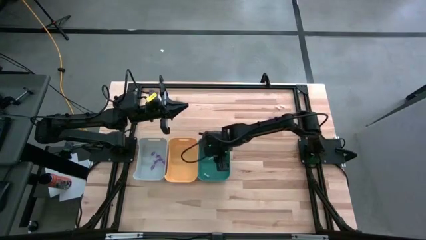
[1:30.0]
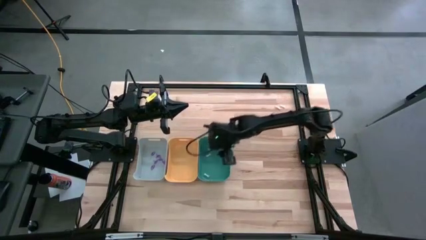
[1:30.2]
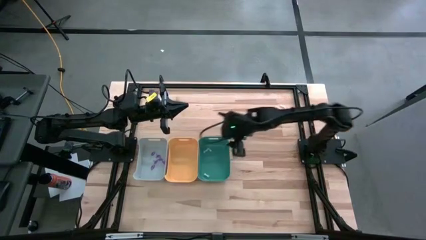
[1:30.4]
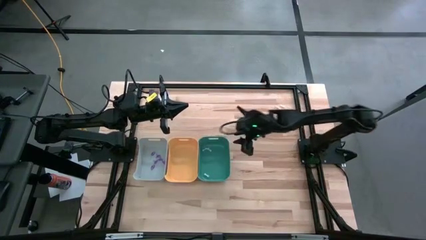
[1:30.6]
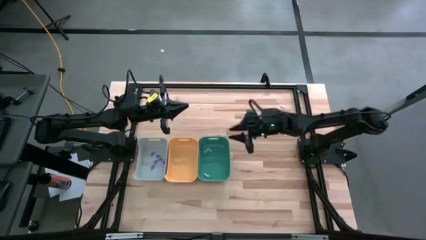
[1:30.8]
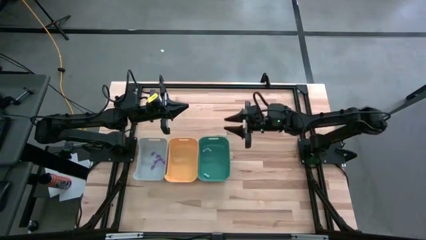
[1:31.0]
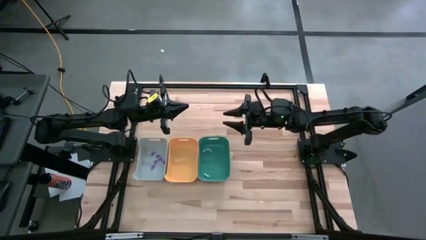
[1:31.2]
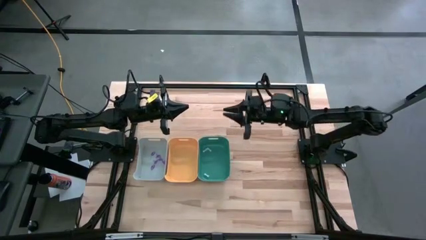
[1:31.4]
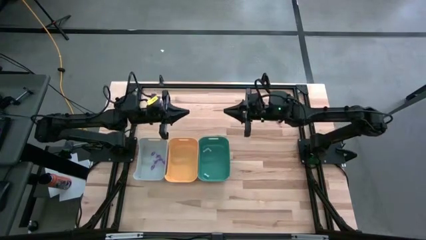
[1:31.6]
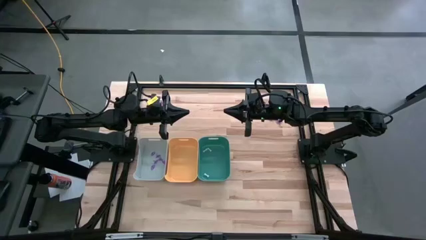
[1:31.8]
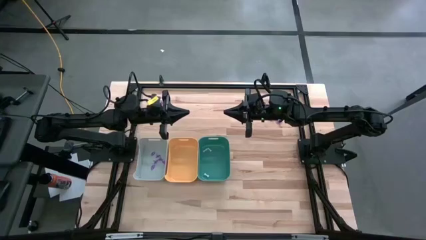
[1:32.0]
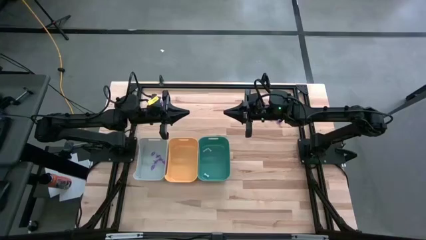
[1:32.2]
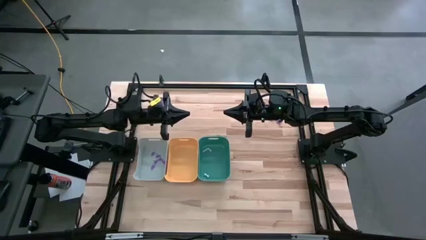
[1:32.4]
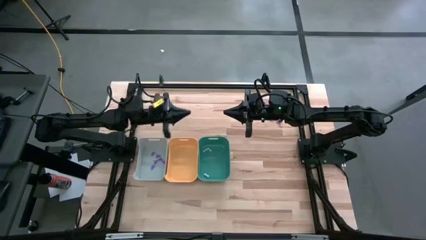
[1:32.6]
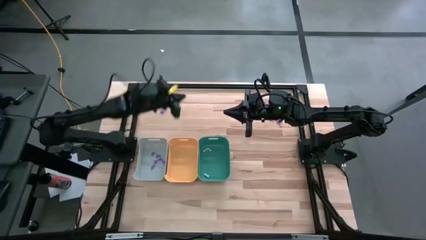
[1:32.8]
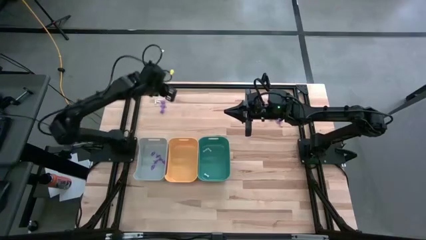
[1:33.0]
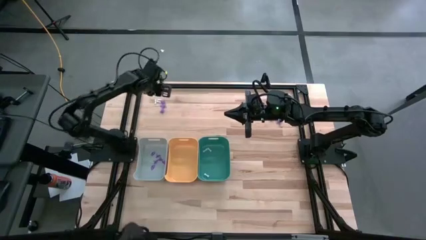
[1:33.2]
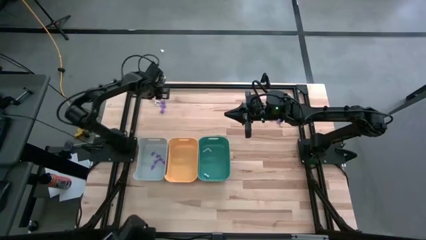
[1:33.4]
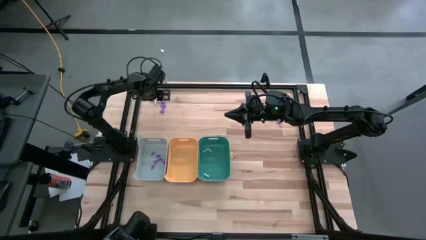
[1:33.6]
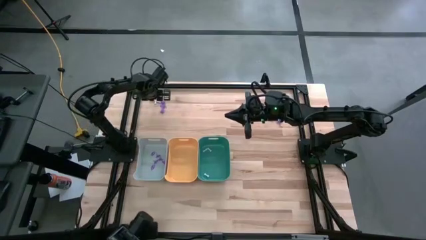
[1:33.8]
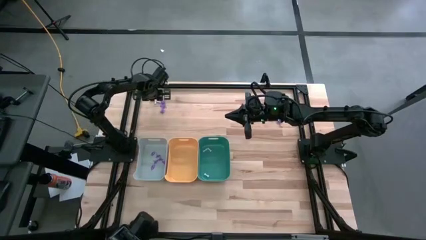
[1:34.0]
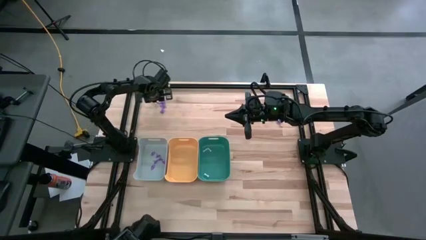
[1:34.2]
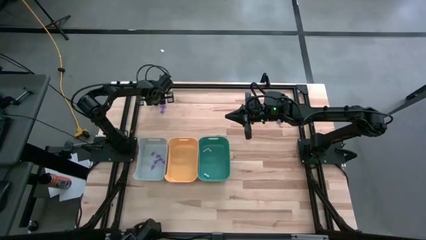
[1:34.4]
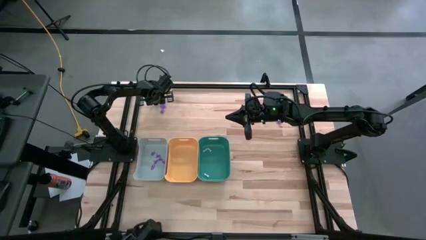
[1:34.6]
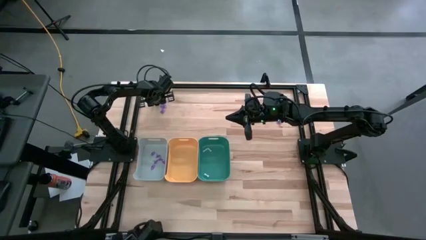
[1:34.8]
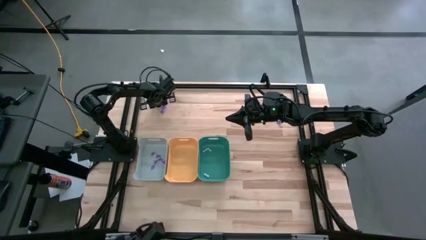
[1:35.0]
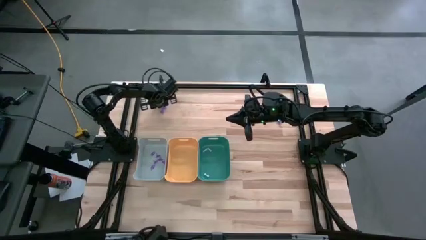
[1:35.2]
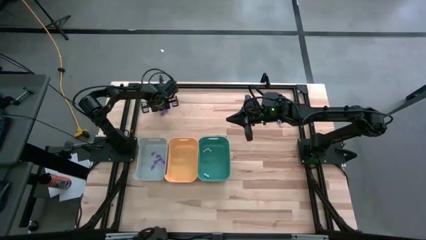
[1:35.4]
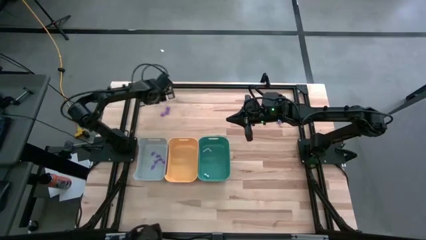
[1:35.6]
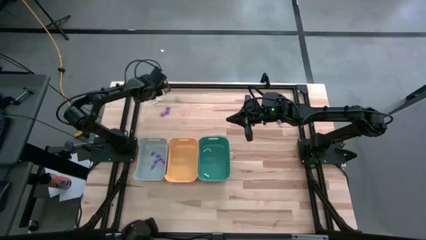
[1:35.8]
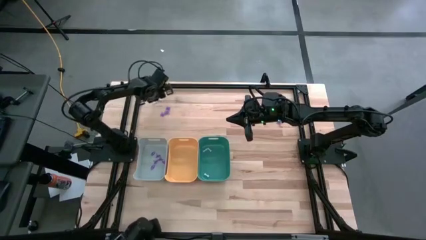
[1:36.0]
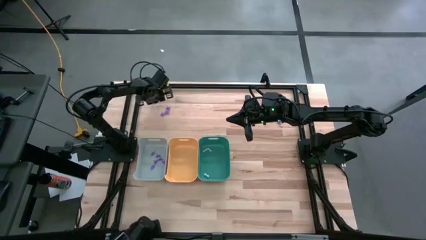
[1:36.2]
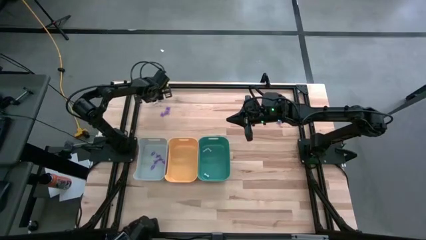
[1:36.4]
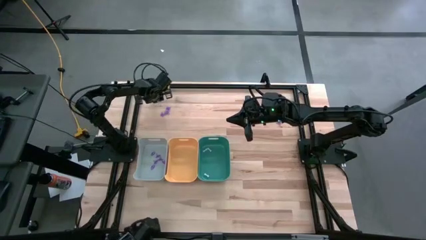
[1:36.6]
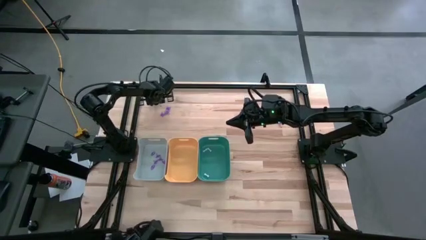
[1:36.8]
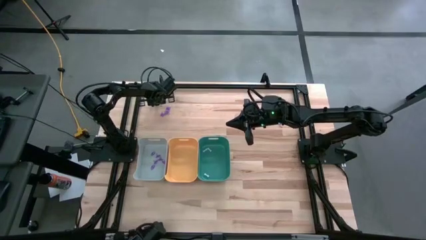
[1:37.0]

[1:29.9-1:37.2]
Task: Sort Halloween decoration
Put the white bone toy into the green bin

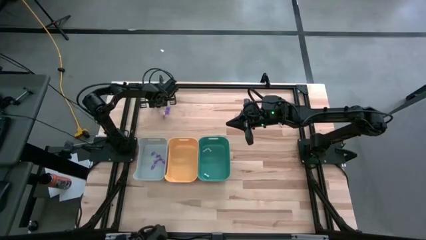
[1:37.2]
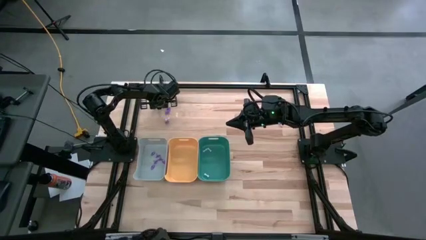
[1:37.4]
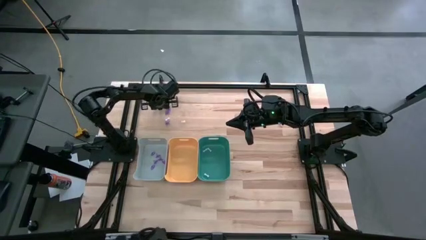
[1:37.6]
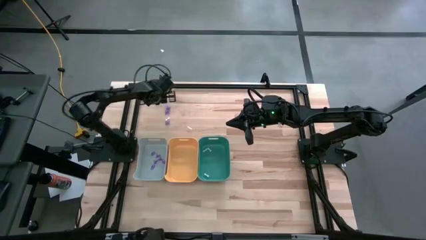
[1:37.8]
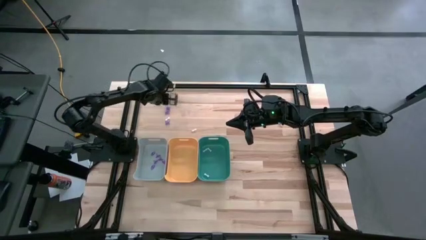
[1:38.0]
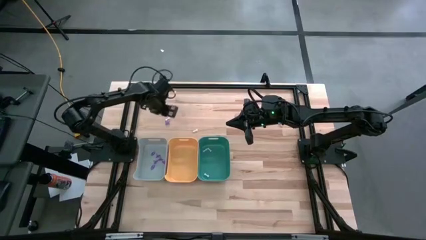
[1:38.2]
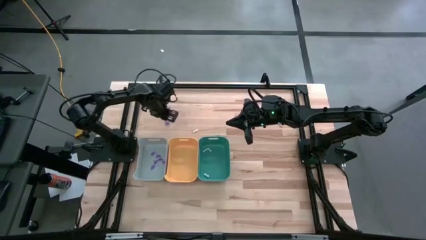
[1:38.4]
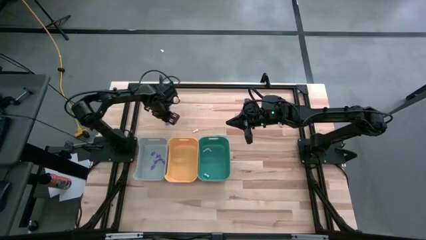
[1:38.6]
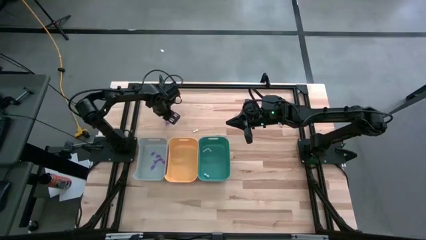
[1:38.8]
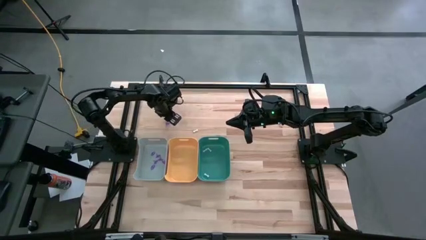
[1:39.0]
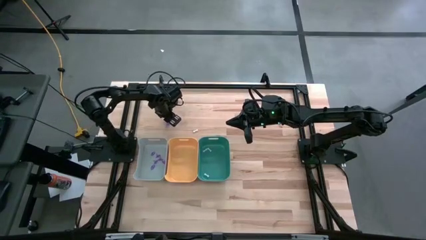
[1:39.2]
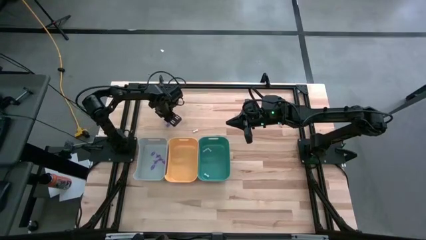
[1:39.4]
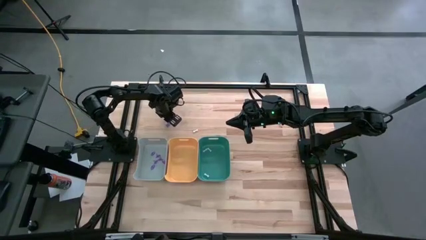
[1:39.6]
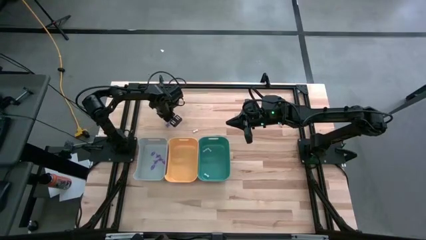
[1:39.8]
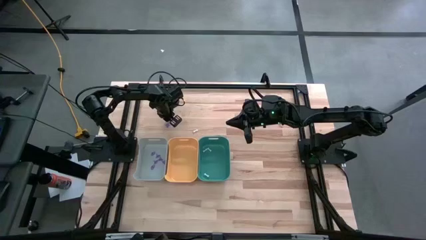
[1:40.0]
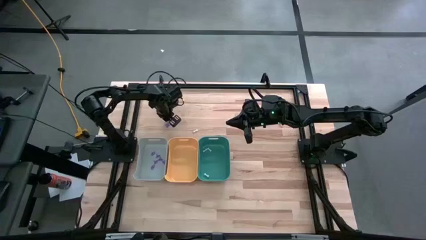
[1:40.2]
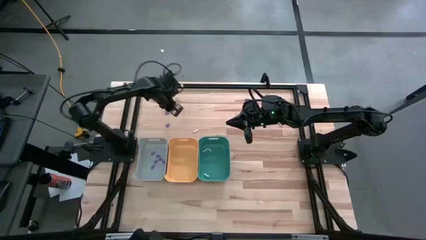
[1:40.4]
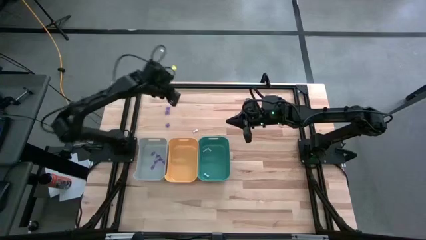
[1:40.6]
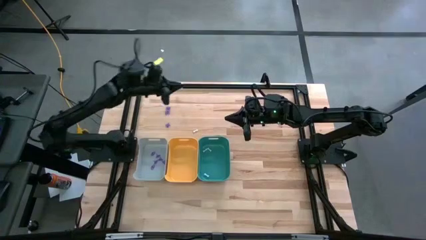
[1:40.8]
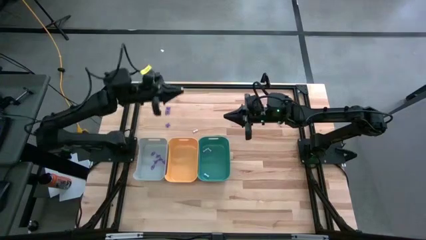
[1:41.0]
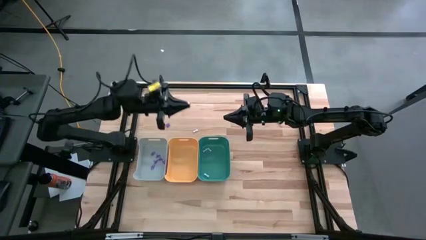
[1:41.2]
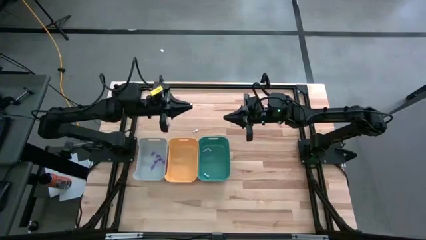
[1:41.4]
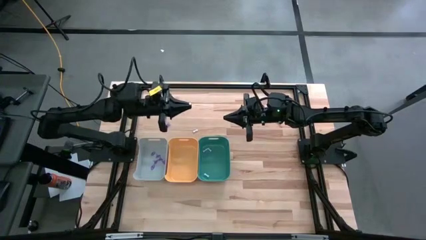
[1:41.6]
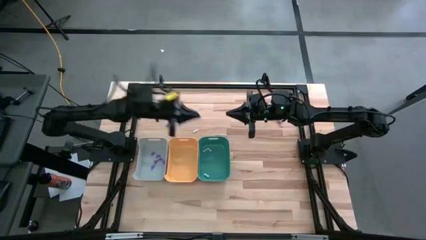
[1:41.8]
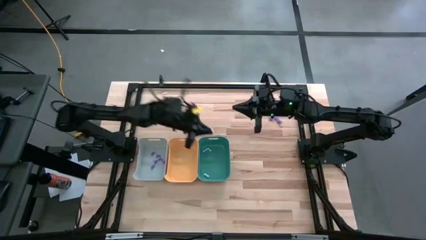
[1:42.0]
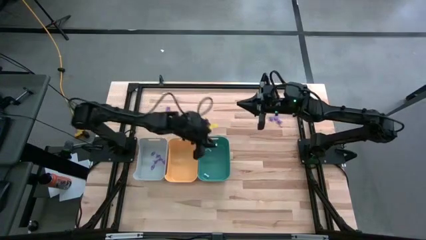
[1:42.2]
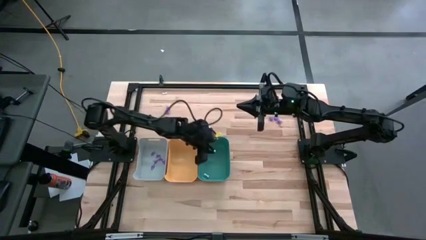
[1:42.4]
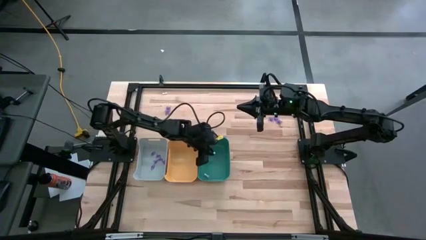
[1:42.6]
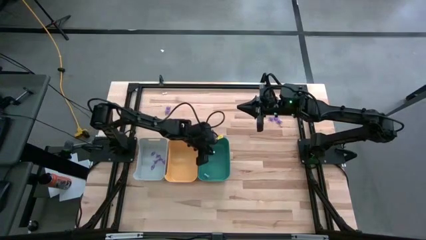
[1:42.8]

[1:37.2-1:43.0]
Put the white bone toy into the green bin

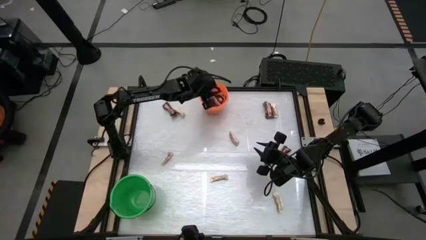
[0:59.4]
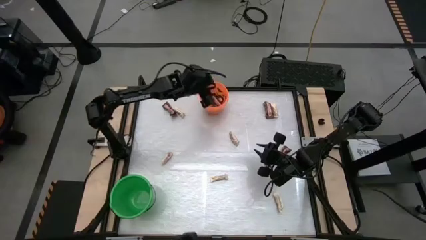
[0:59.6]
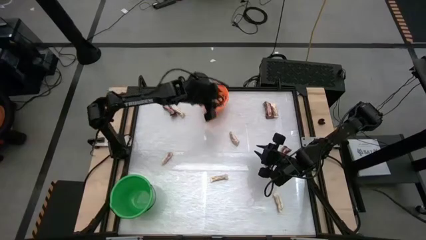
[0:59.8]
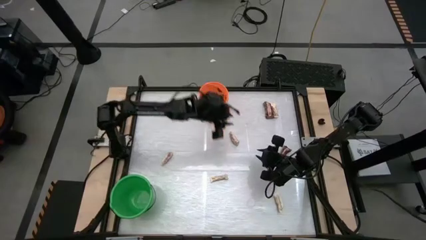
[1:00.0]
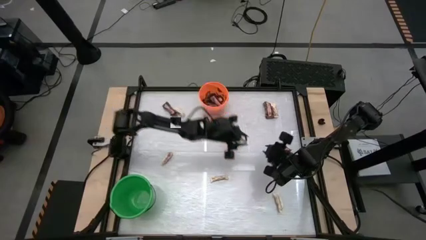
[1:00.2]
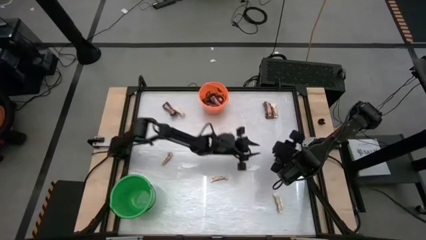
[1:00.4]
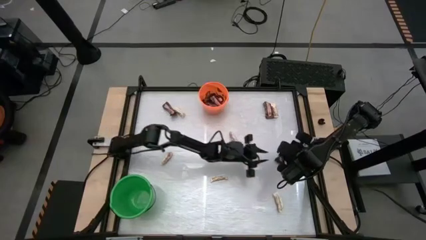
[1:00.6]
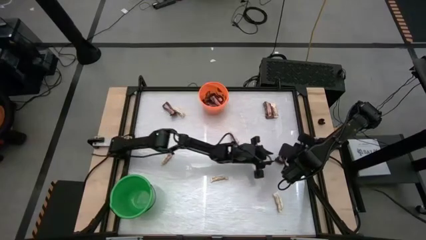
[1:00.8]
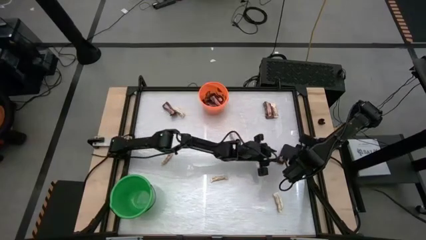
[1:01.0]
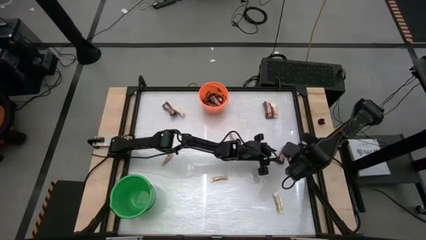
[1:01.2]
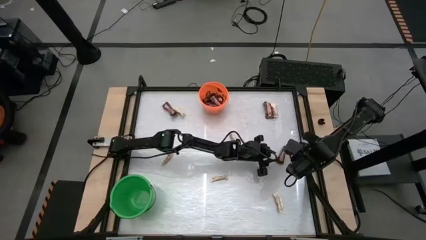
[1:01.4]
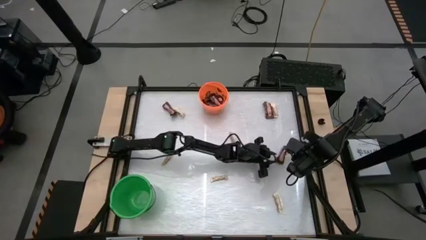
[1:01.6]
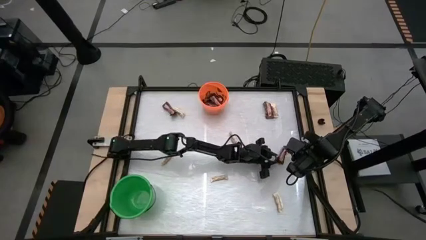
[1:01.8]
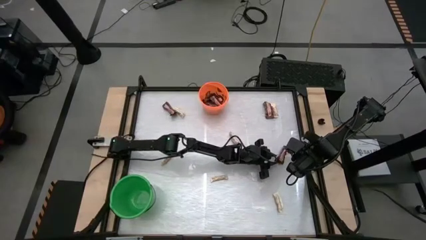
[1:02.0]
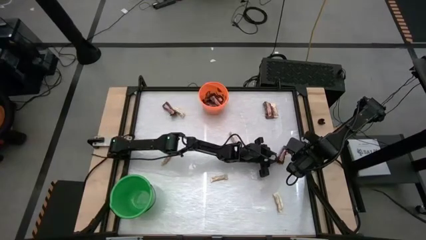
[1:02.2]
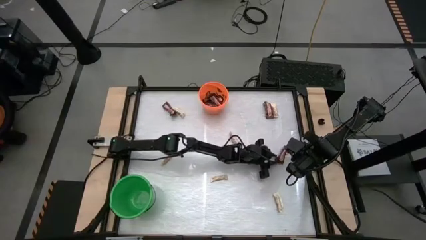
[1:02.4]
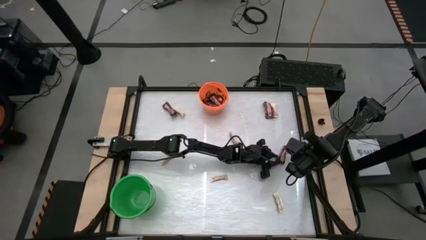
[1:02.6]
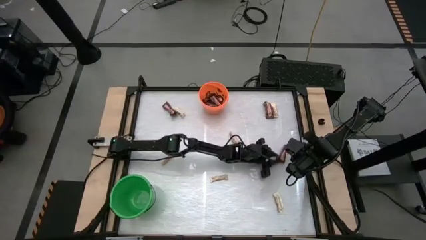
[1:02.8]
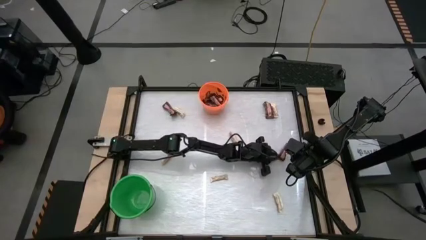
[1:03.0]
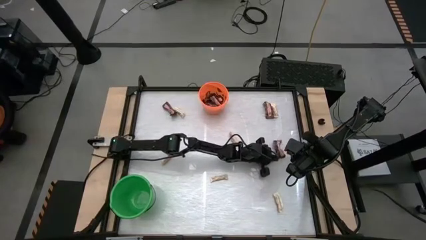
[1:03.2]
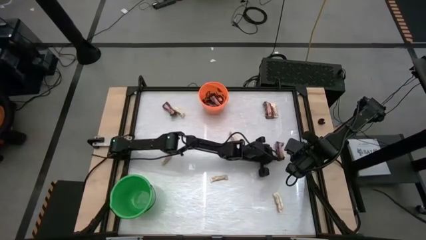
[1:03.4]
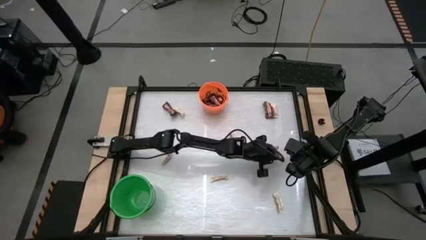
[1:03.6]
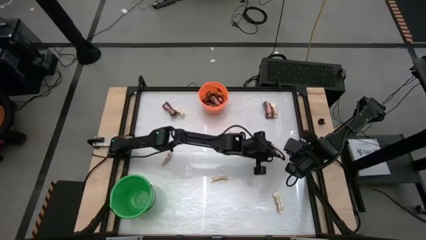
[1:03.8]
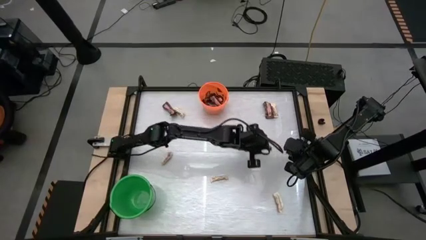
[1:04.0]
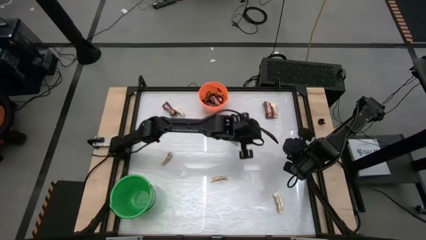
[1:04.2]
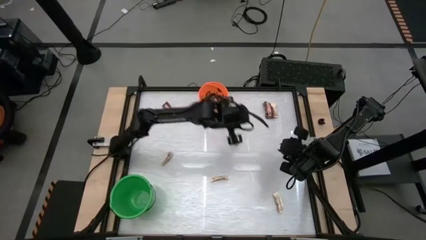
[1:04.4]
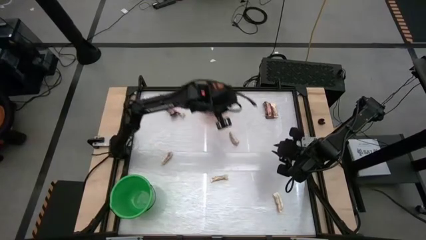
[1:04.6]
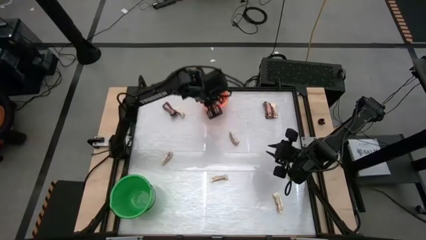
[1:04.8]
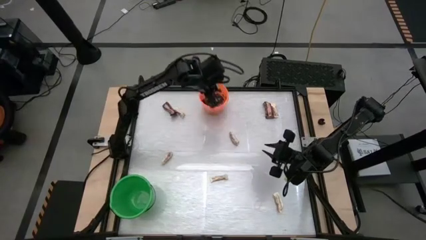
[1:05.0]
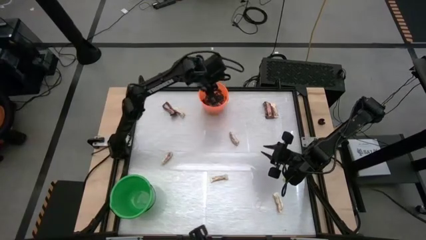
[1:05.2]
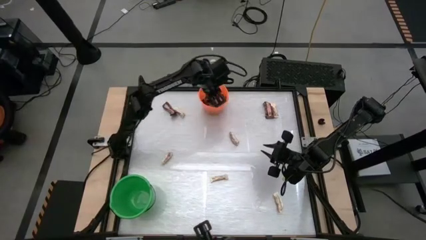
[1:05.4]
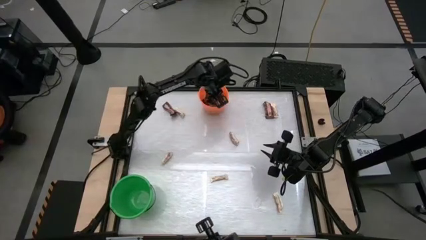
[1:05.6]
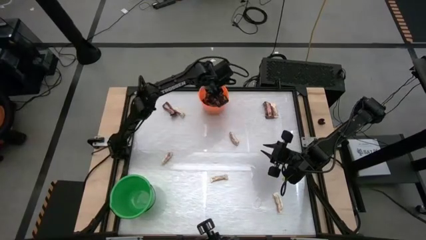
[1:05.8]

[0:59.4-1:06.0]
Task: Sort candy by brand, put in halloween buckets
Put the brown chocolate bar into the orange bucket
